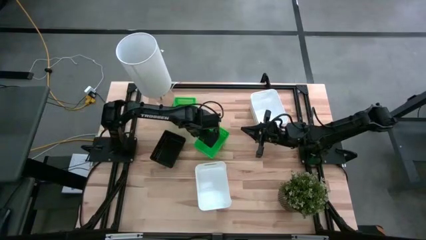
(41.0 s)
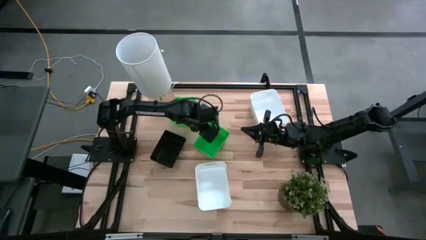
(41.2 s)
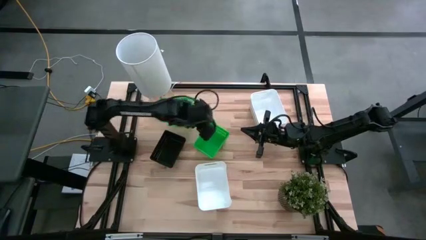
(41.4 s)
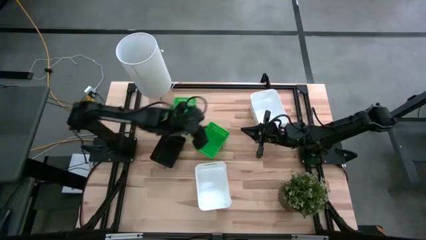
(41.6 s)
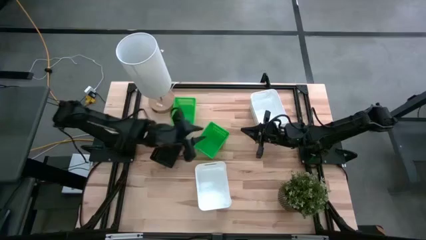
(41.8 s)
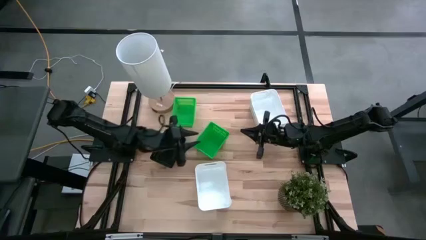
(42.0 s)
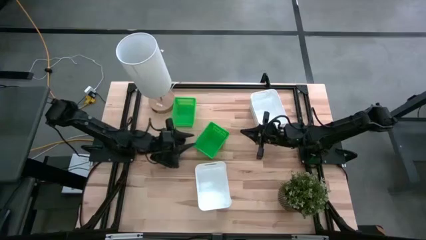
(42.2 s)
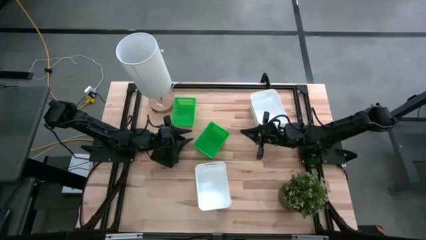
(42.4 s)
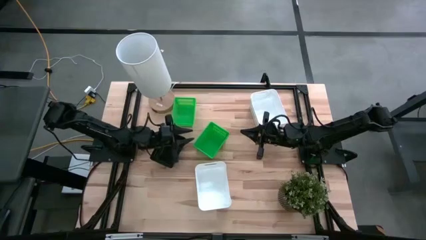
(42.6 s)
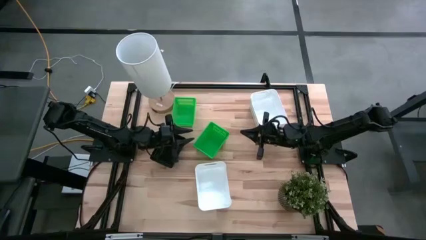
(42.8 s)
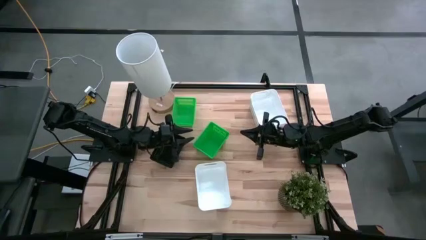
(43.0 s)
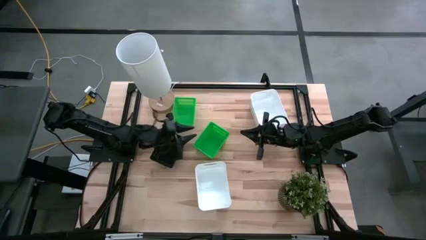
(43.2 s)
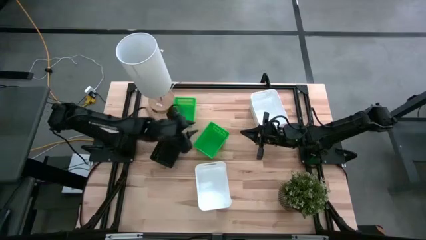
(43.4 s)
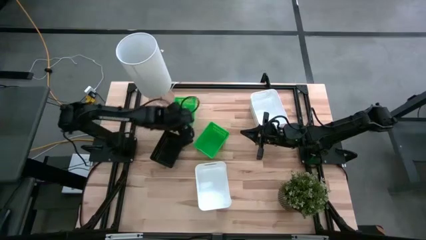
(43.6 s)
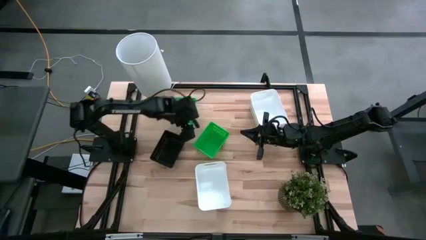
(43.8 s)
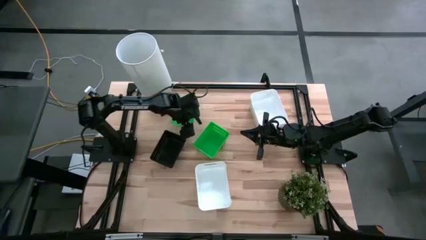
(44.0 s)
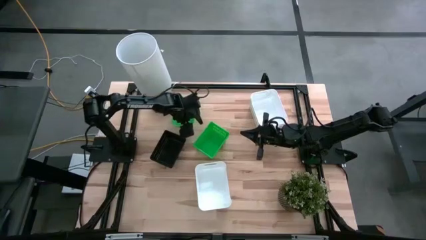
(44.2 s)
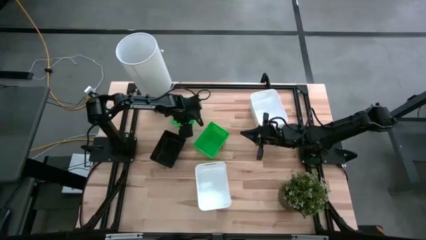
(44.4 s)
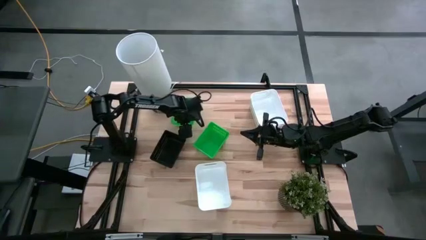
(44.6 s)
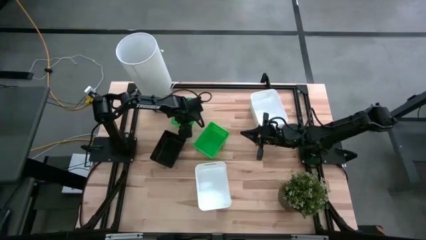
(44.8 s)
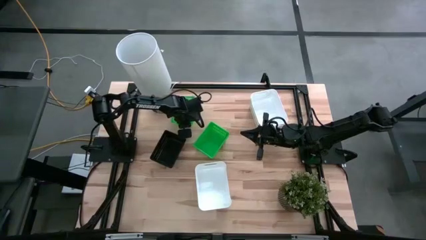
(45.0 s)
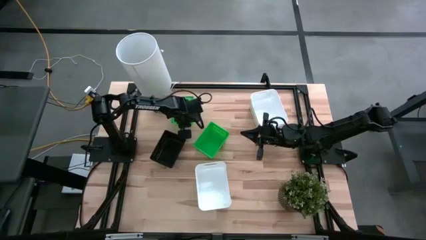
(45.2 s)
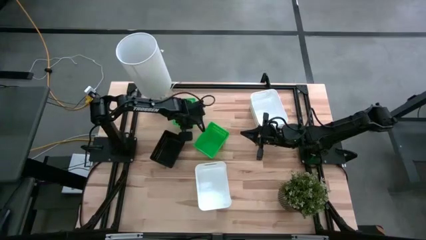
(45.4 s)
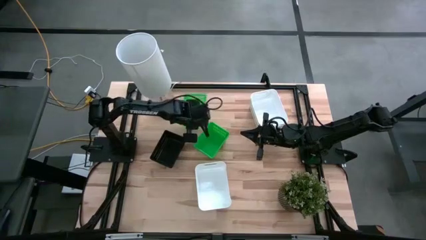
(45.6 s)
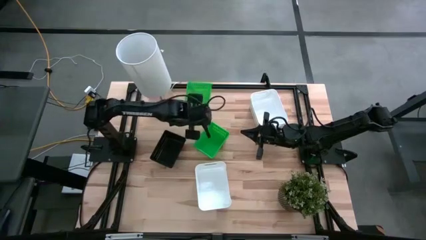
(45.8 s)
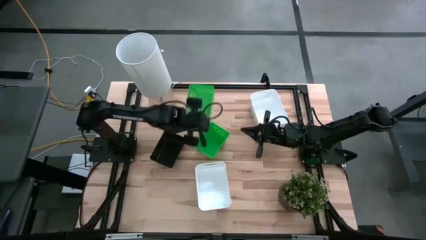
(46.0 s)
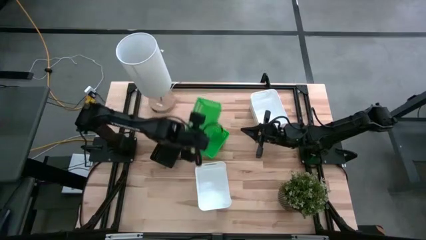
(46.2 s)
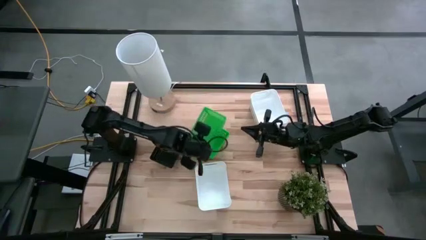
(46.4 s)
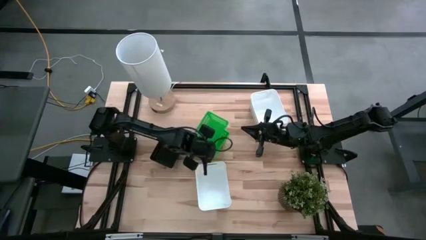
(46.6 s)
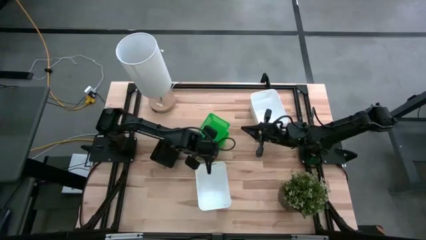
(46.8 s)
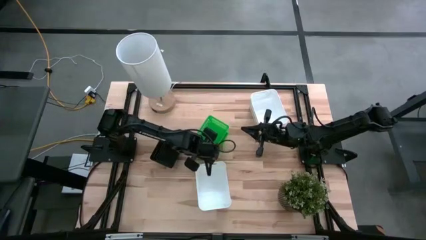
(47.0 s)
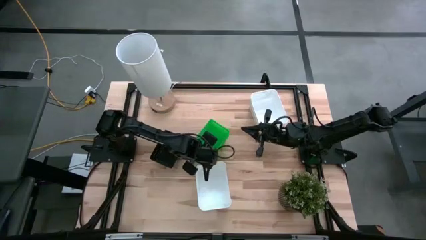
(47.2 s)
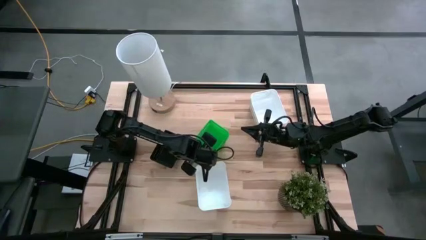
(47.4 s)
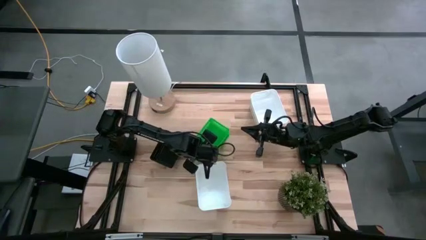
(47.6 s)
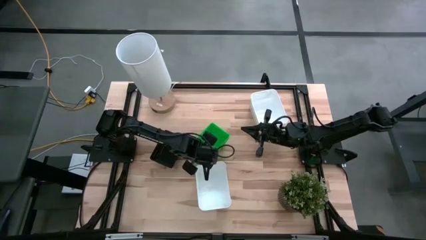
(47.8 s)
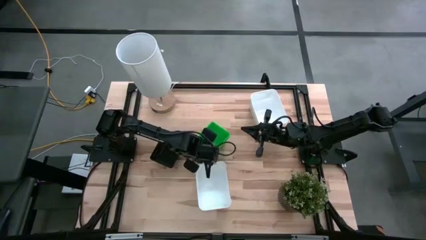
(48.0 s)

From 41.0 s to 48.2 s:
Put the top green bin on the green bin

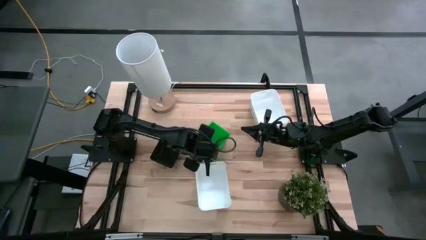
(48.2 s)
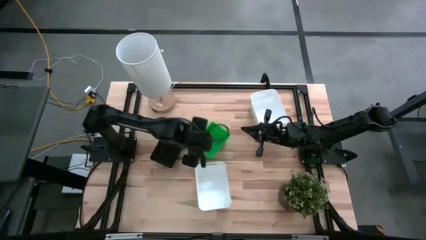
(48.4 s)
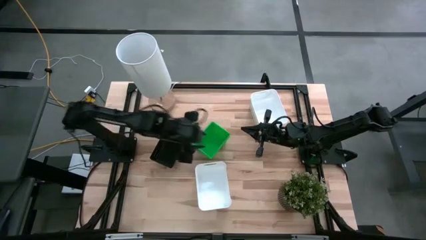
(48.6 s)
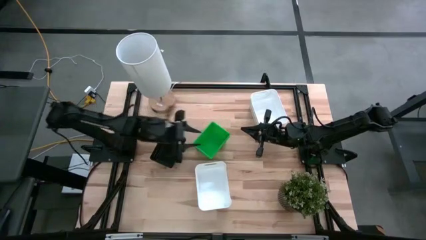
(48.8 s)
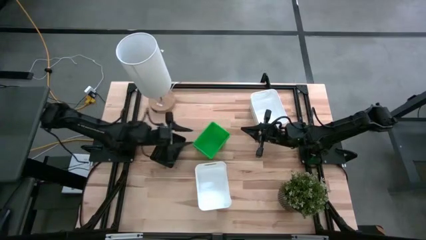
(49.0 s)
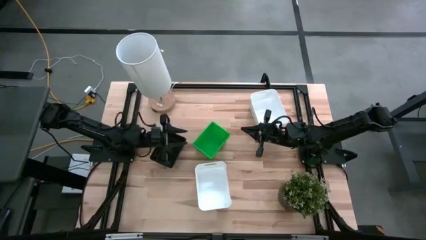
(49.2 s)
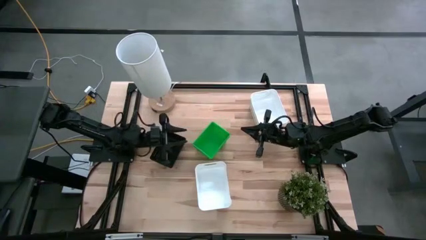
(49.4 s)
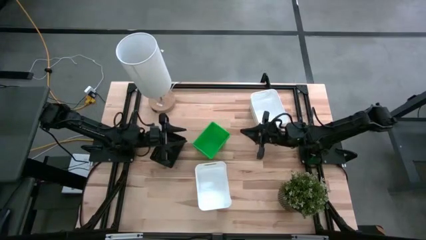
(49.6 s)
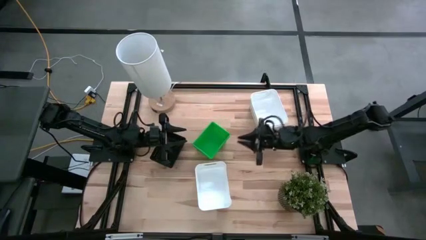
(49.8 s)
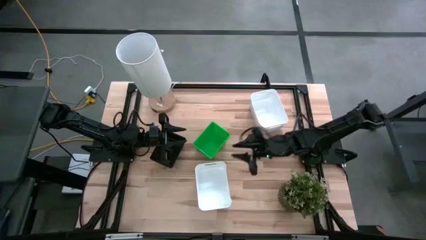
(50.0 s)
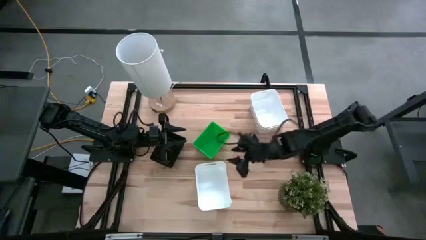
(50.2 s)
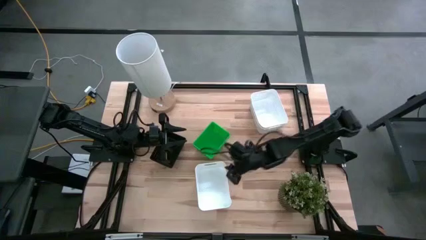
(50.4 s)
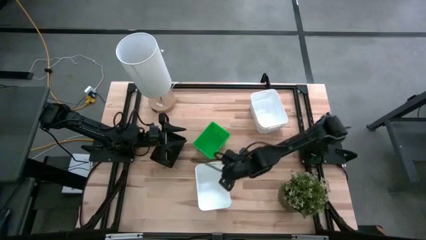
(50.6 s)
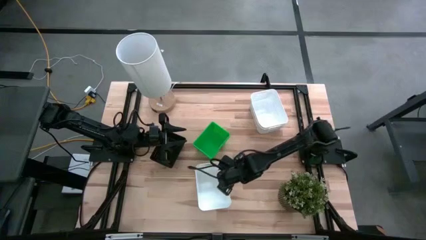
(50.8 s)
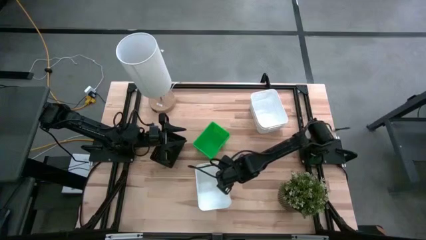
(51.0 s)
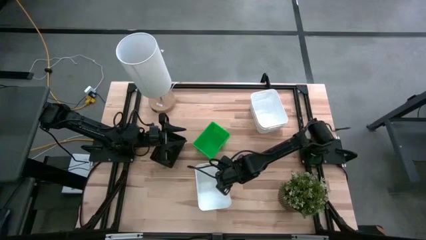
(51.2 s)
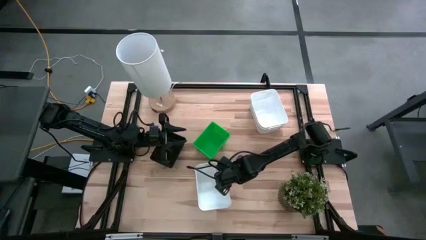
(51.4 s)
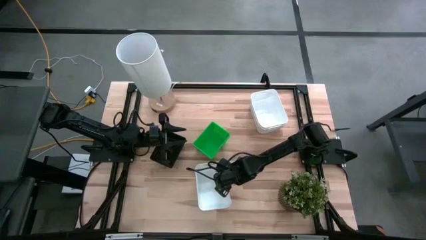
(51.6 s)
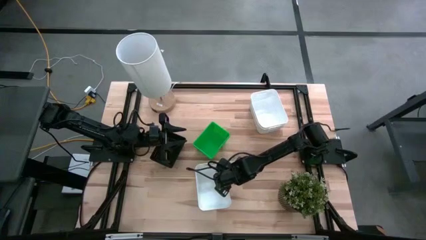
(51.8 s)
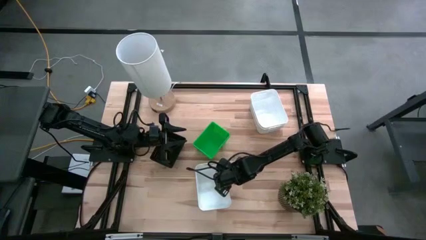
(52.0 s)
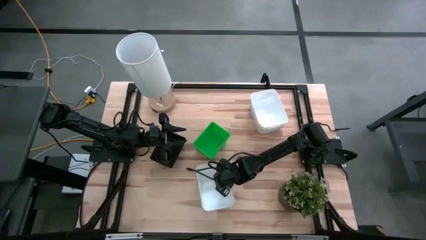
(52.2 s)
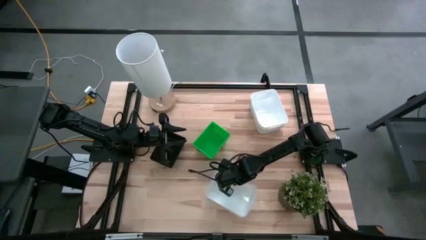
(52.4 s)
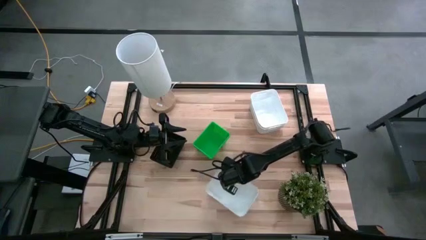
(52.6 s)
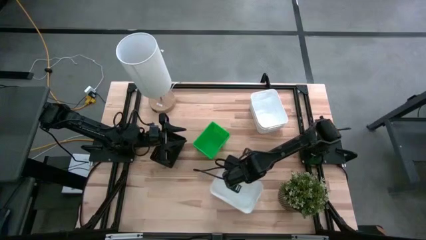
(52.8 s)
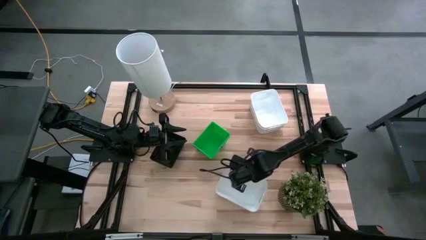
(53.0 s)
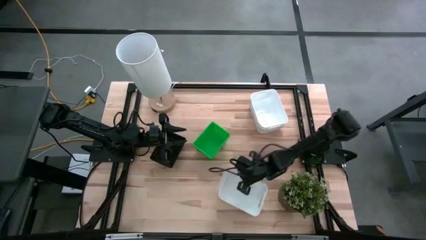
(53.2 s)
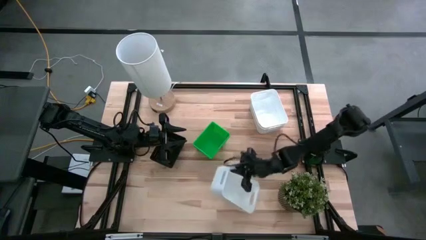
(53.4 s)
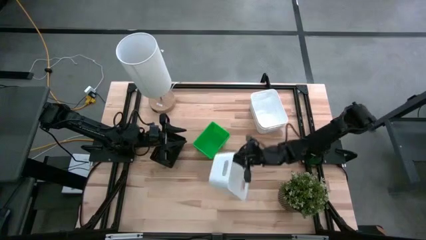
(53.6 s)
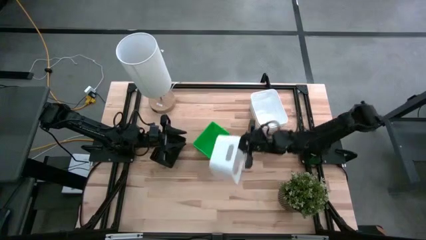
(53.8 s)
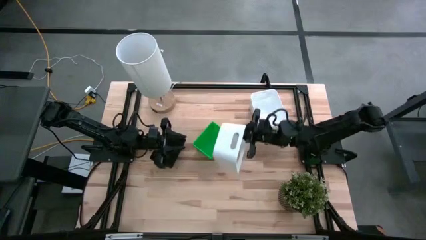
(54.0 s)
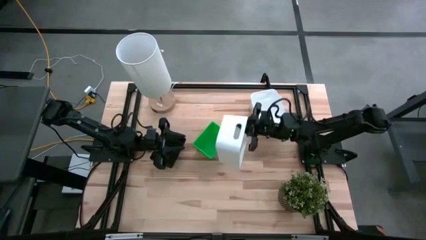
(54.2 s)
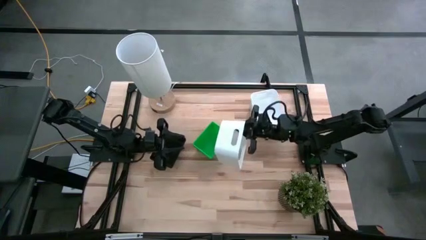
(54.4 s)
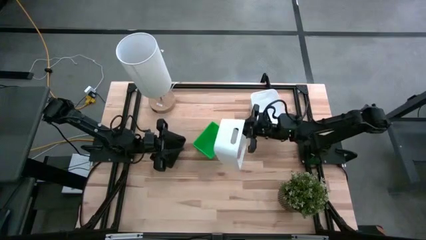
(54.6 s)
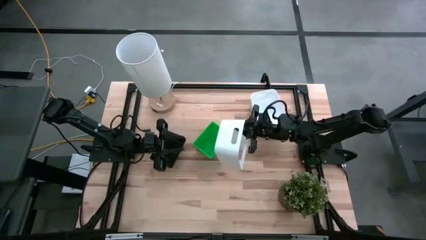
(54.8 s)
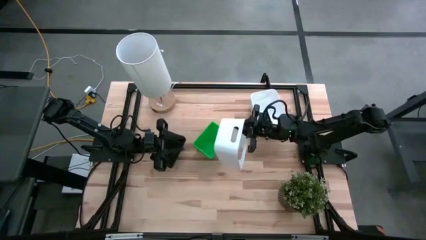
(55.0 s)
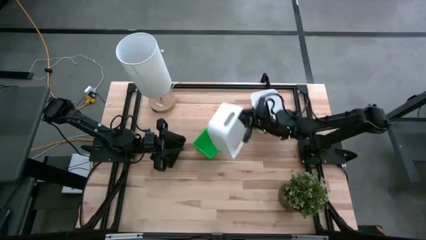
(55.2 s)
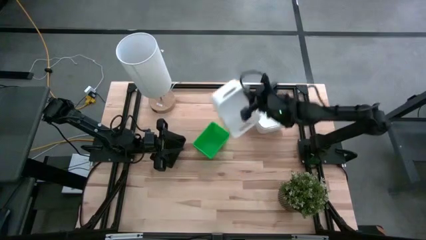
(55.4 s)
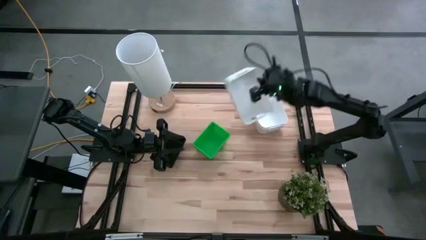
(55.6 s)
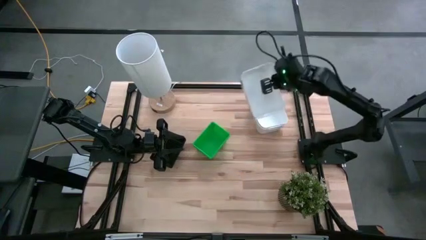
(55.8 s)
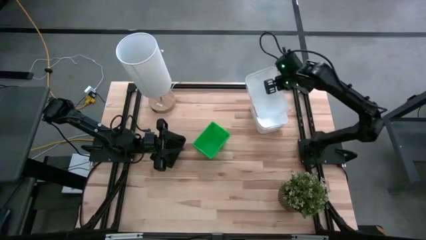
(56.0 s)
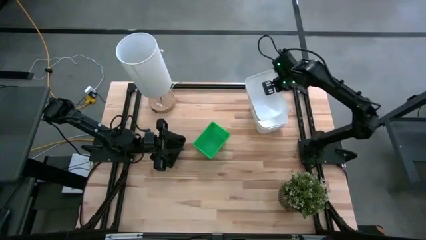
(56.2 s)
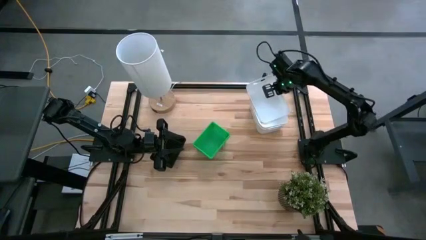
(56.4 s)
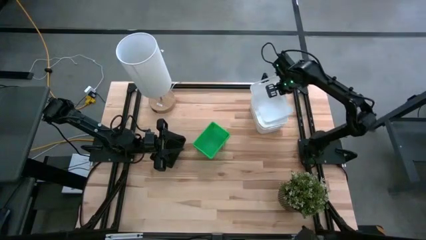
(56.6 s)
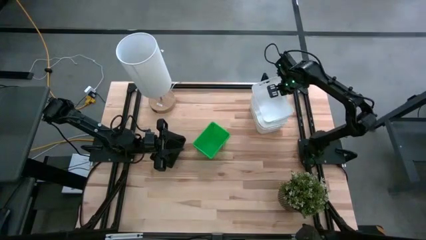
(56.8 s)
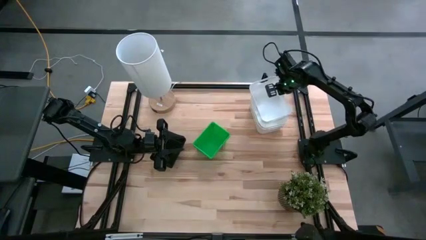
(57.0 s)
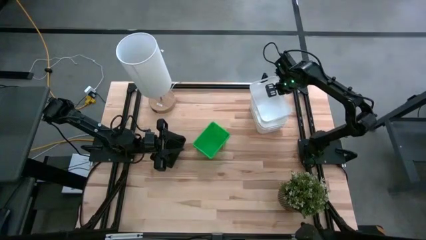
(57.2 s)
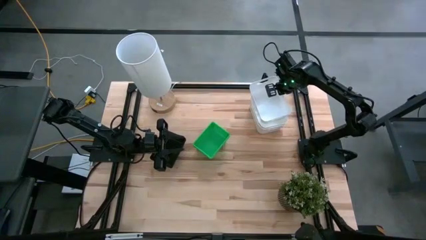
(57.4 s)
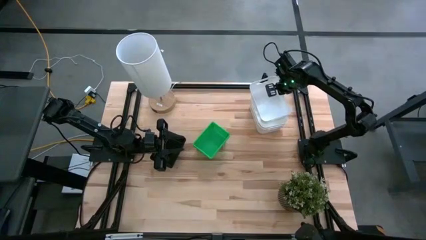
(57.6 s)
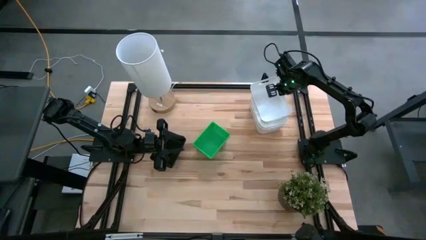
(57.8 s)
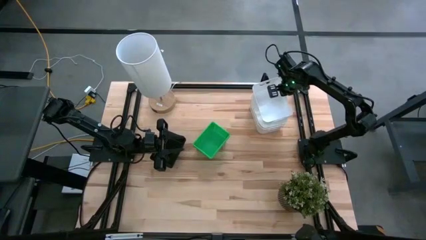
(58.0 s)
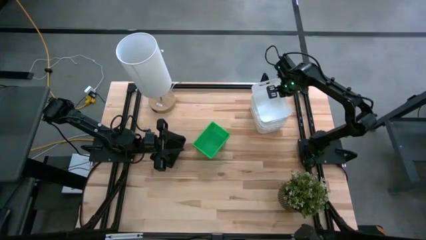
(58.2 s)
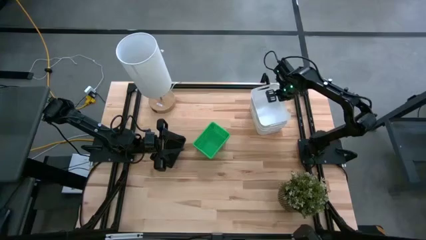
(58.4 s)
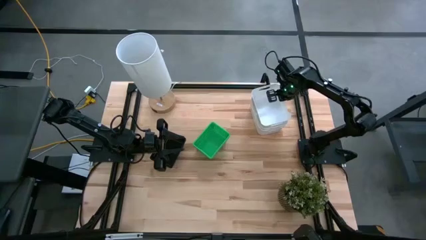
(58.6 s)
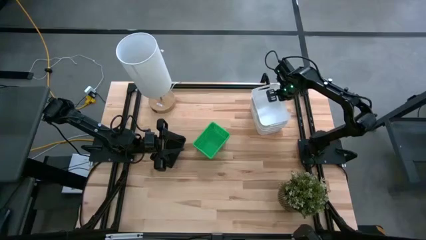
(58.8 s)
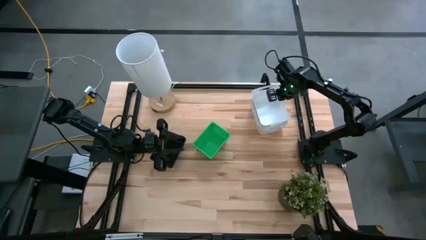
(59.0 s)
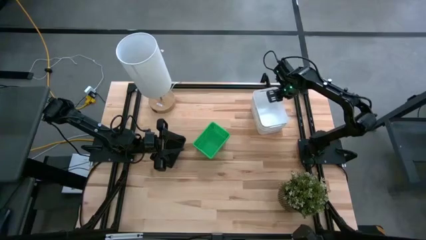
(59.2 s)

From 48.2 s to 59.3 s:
Put the bottom white bin on the white bin
